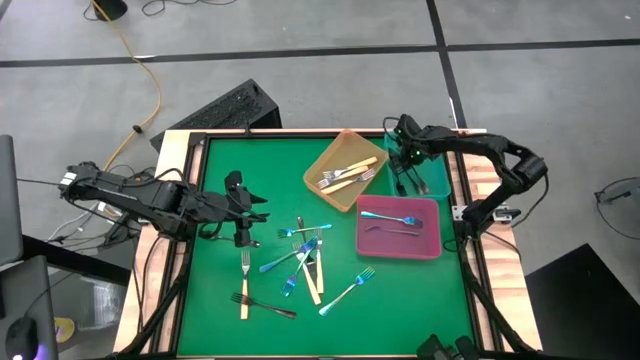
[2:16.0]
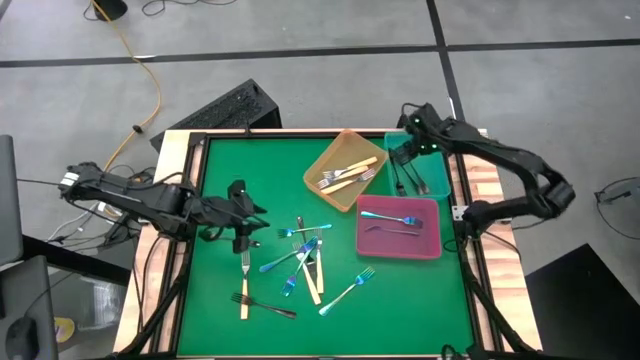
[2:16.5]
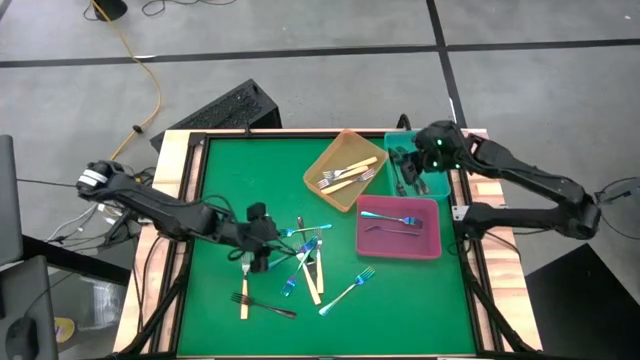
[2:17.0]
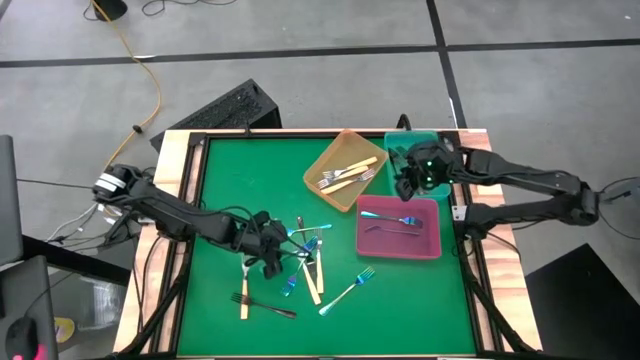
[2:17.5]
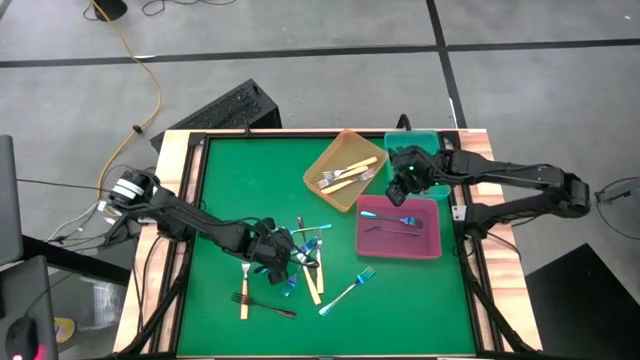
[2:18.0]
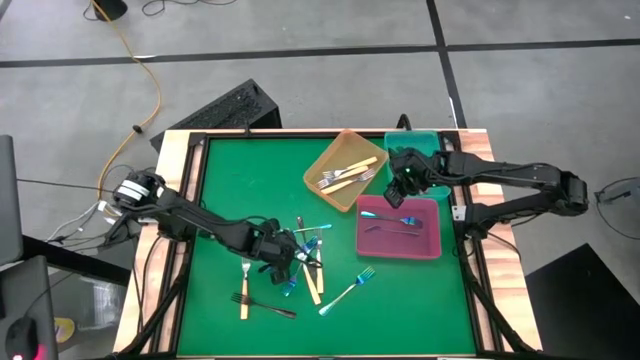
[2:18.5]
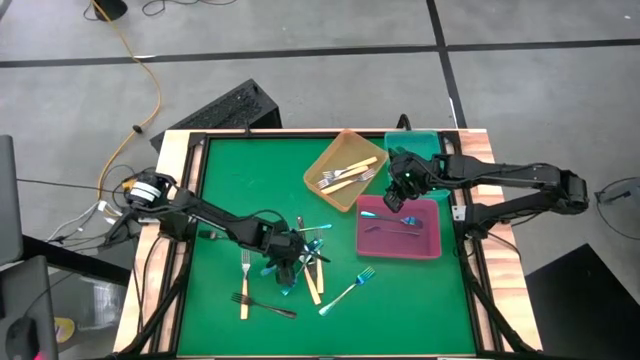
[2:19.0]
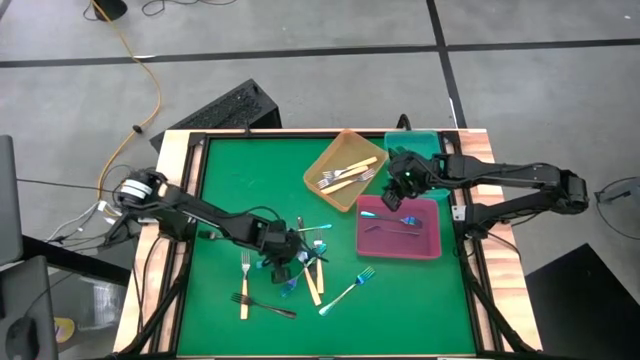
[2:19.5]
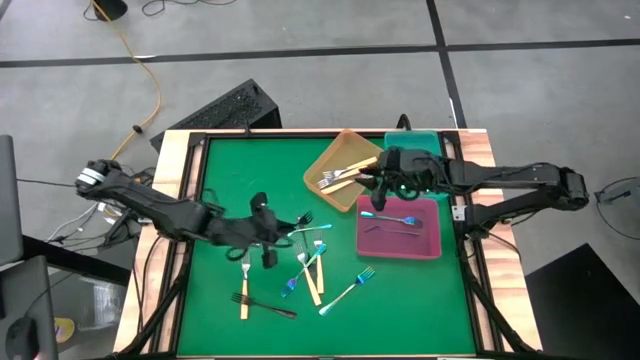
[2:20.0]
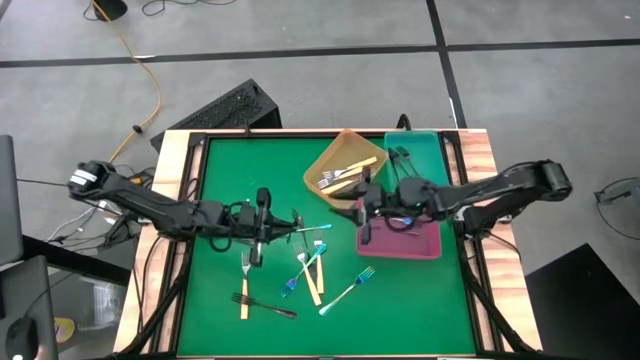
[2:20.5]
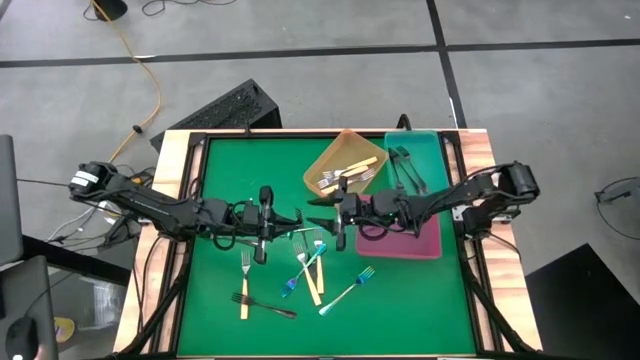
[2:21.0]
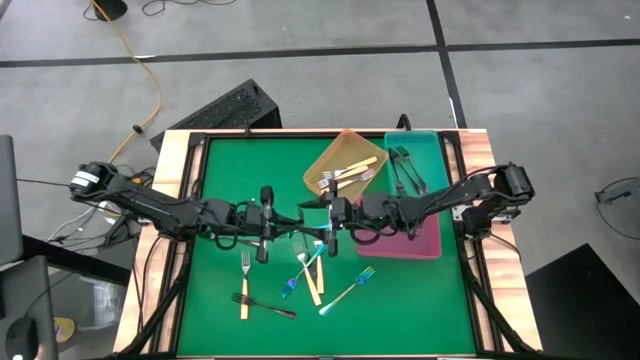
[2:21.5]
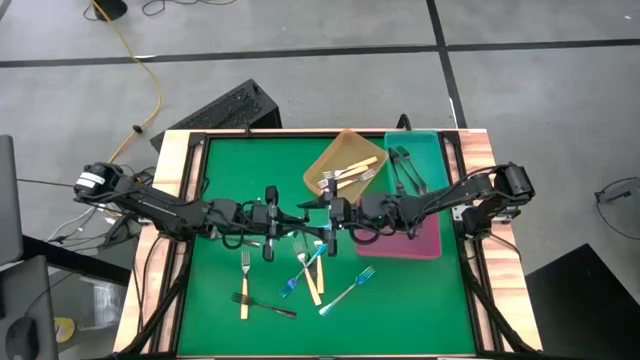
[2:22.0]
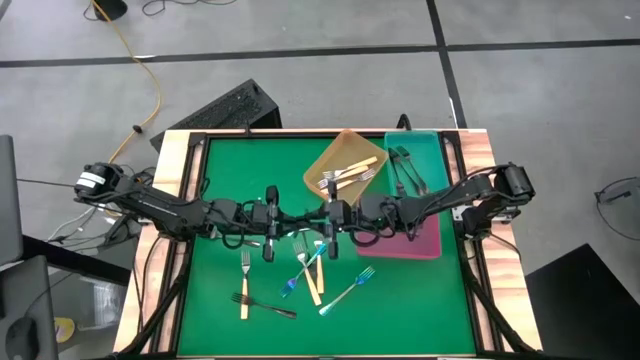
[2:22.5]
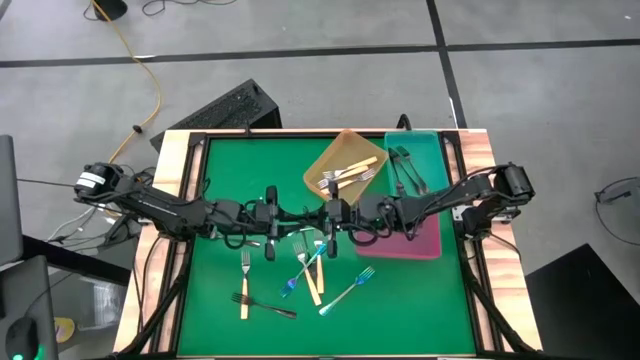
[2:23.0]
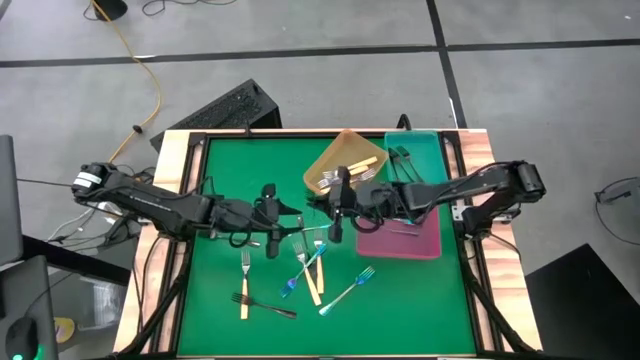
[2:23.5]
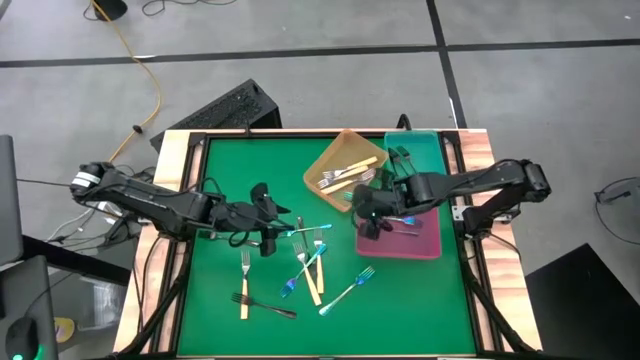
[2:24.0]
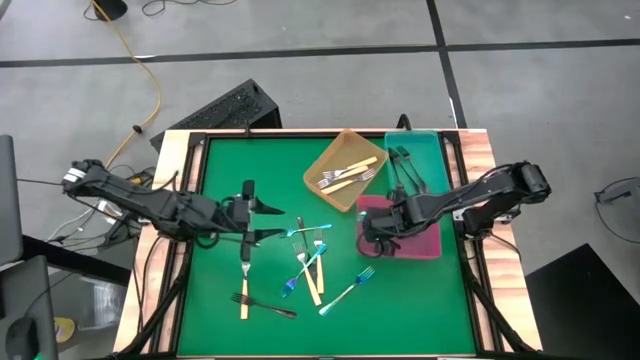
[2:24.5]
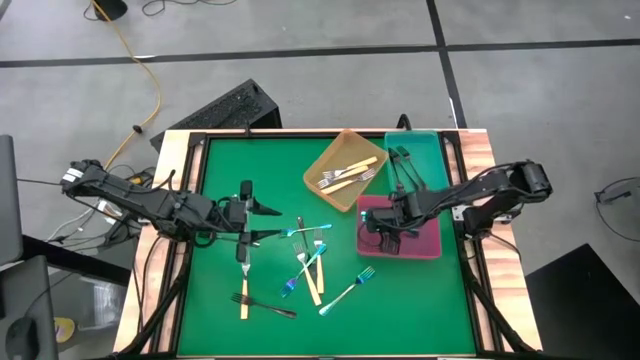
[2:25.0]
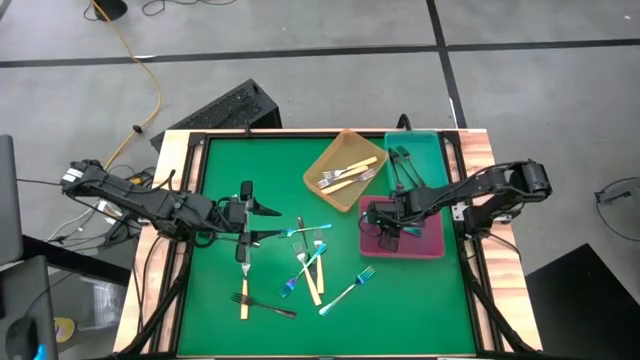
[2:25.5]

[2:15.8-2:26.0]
Task: Sort silverware by color (type)
Put the blue fork into the pink bin

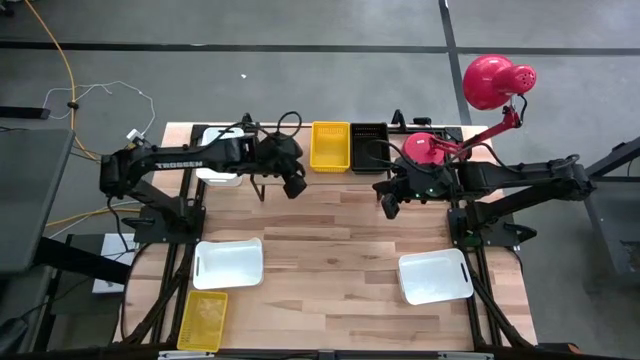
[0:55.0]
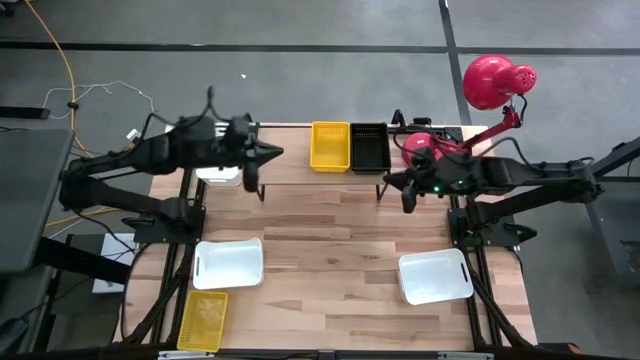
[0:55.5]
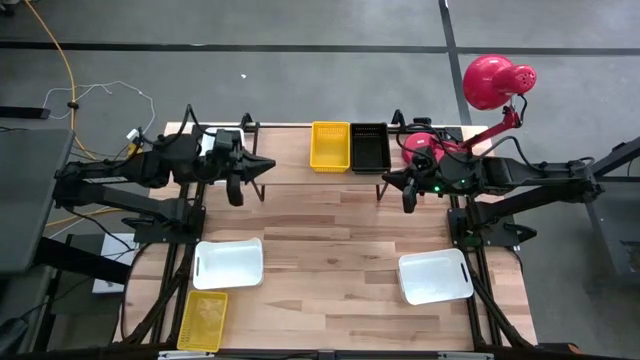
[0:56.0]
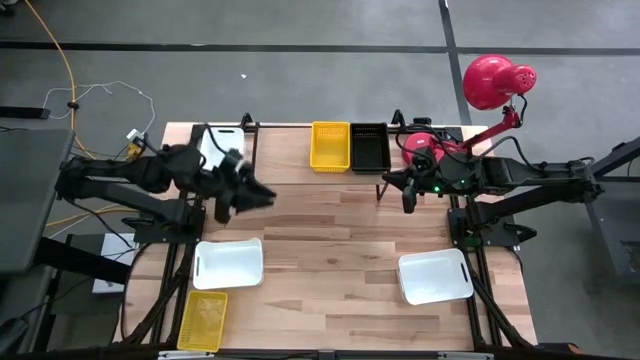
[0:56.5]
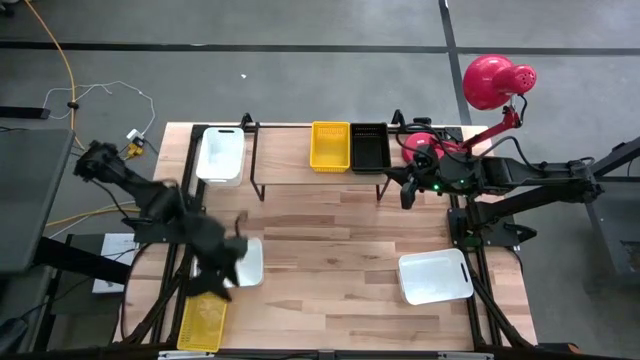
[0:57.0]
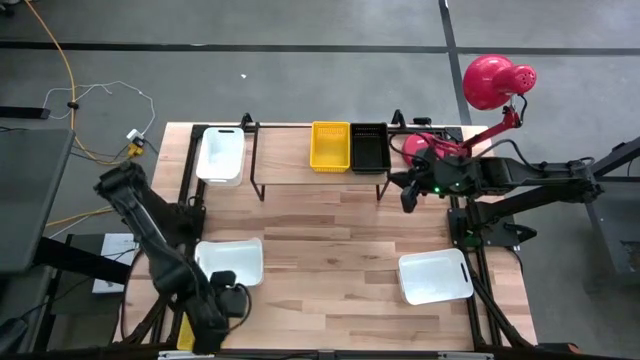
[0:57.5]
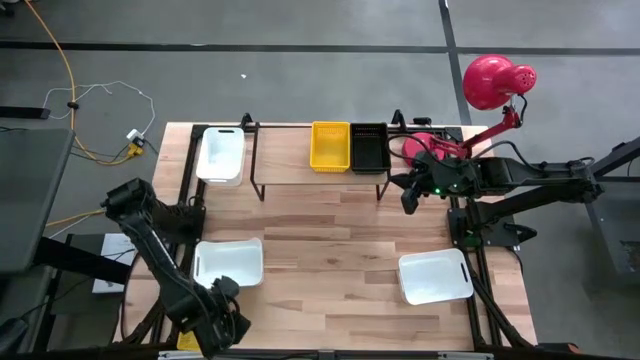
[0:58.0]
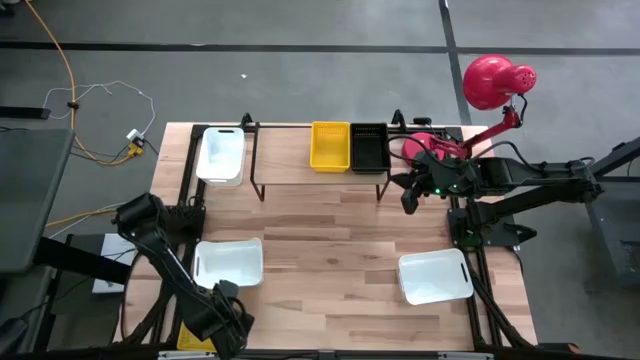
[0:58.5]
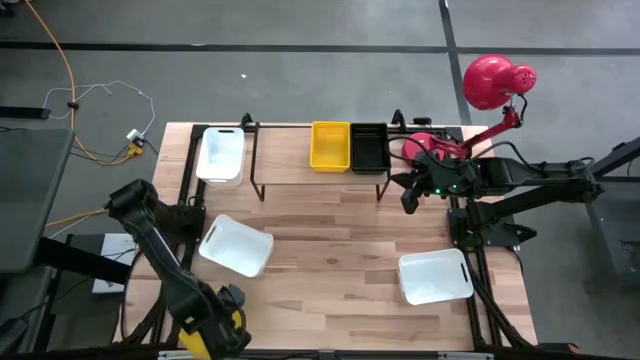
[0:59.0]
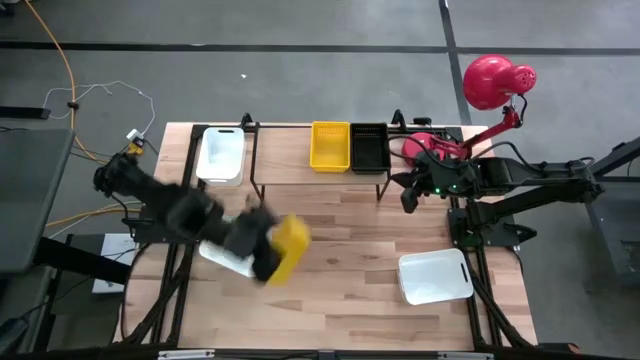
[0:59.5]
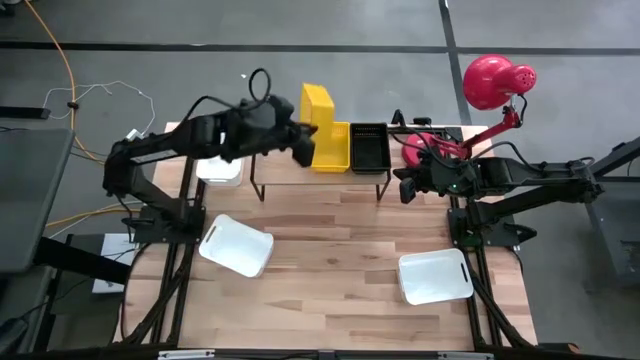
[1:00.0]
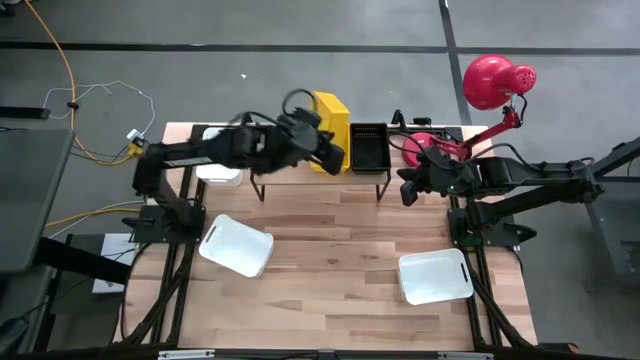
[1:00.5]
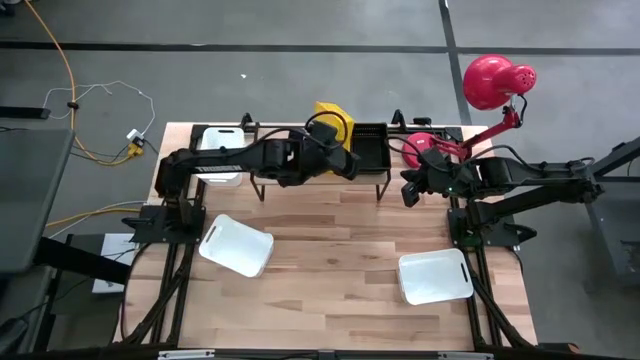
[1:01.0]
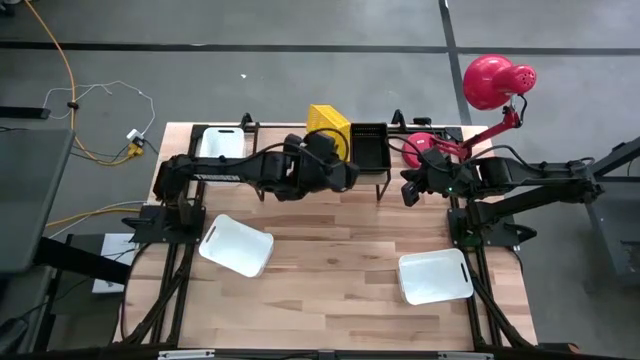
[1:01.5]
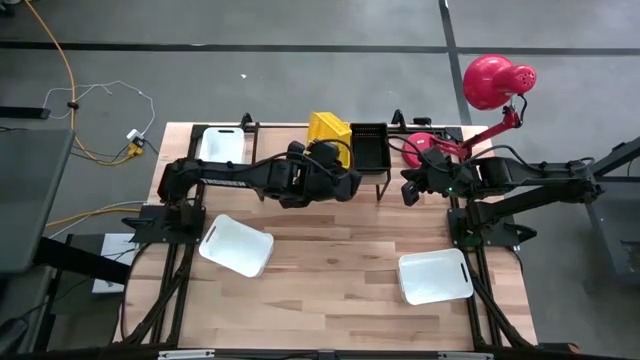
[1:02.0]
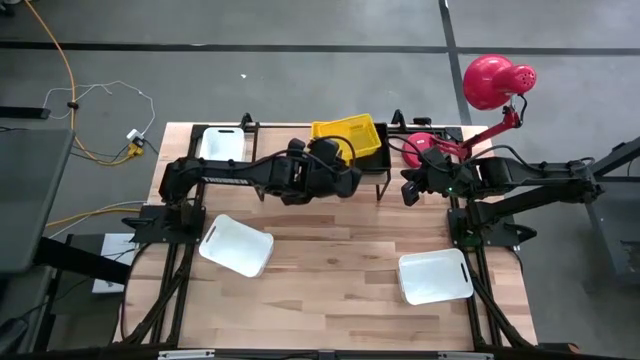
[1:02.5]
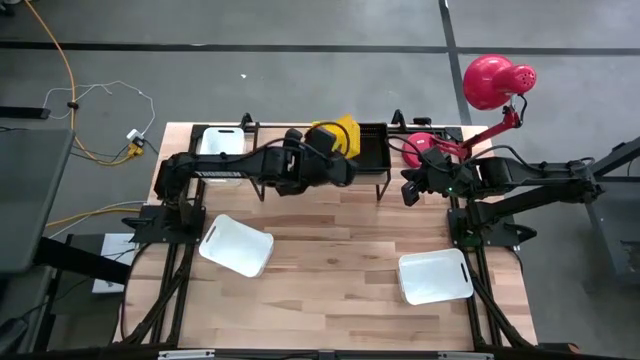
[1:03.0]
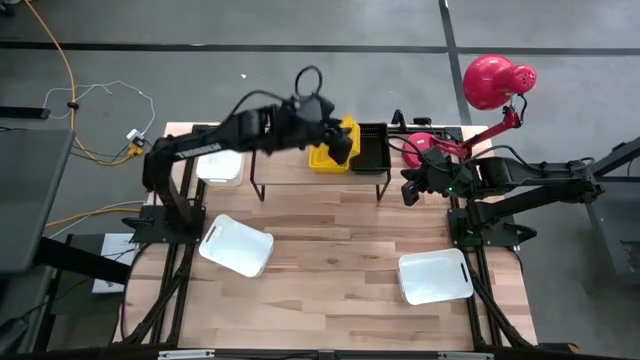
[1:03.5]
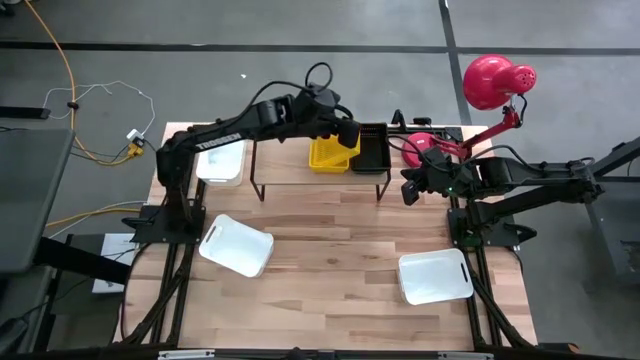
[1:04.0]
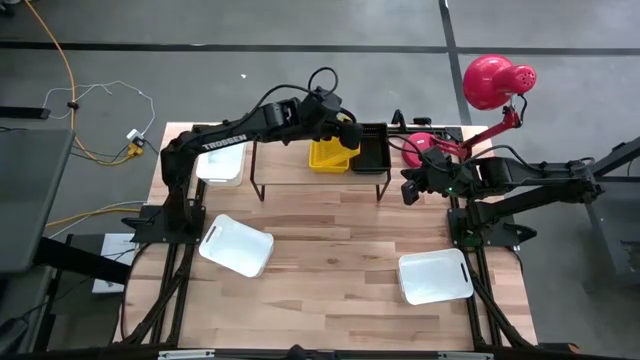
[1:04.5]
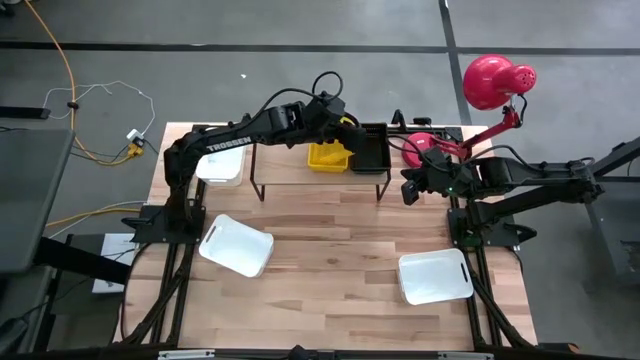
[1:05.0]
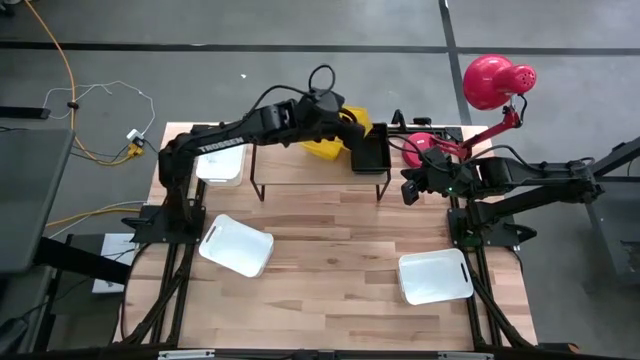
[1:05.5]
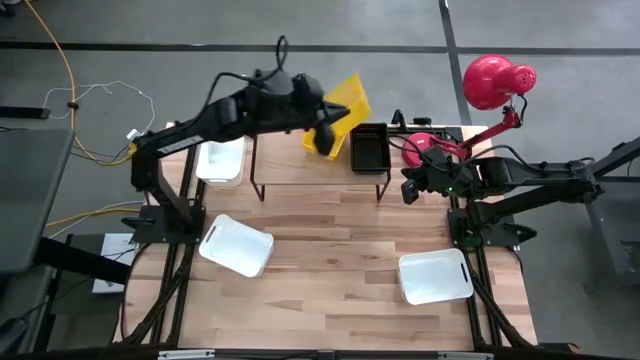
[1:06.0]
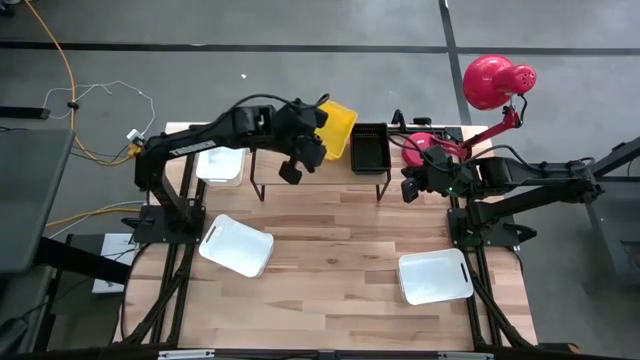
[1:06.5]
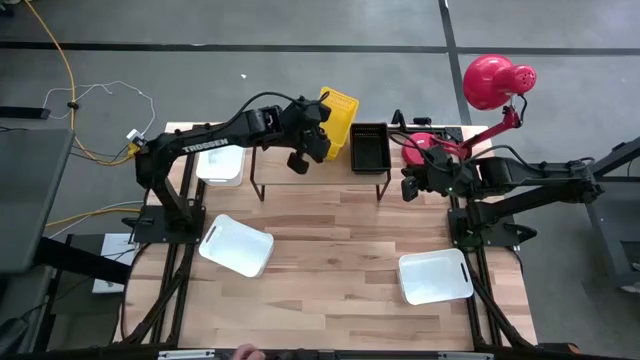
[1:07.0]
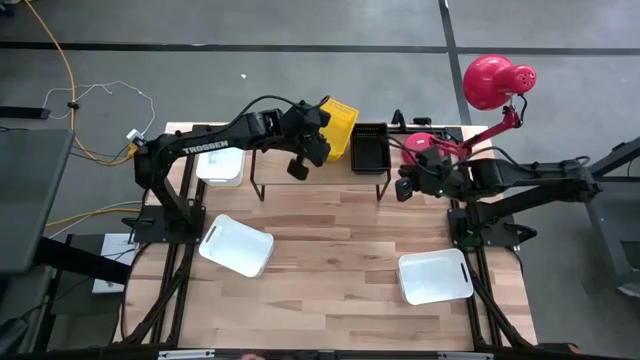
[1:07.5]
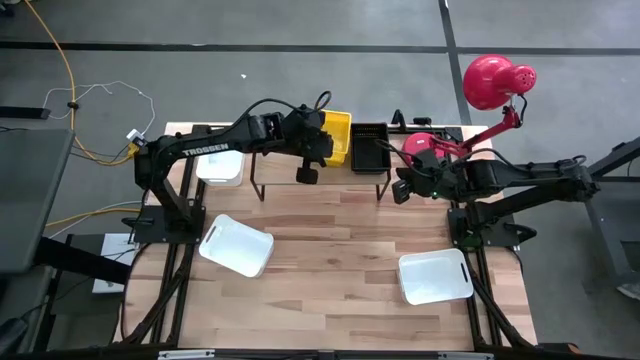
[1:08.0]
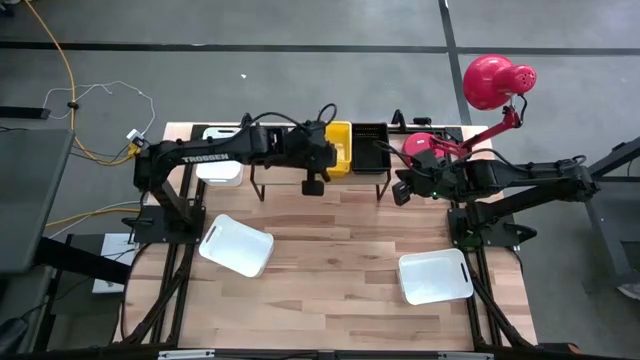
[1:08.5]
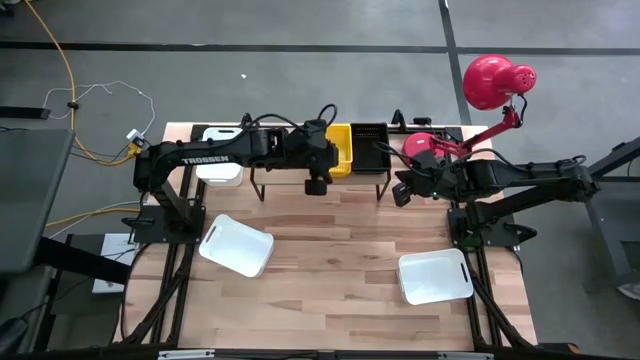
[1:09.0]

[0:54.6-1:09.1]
Task: Stack baskets on shelf by color
Stack the yellow bin into the yellow bin on the shelf
